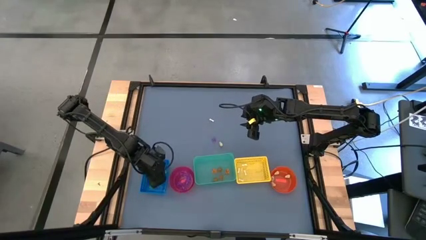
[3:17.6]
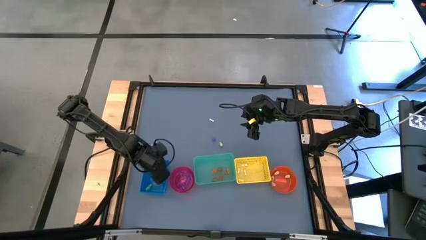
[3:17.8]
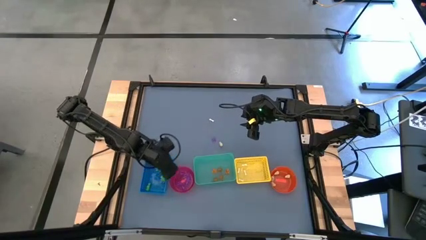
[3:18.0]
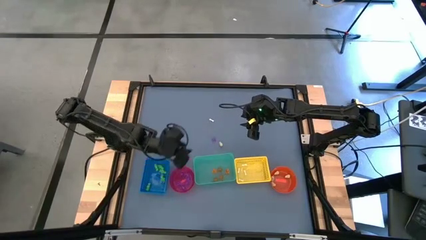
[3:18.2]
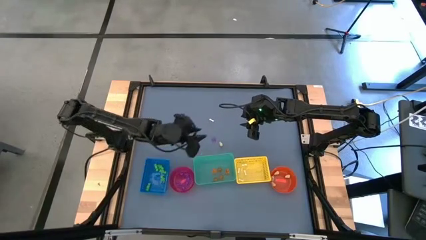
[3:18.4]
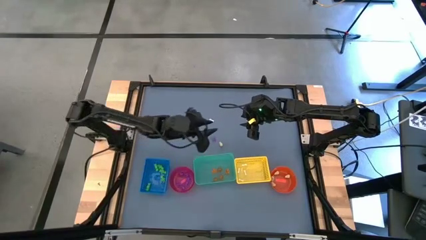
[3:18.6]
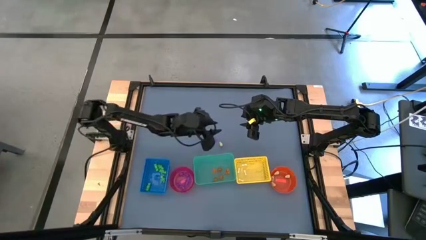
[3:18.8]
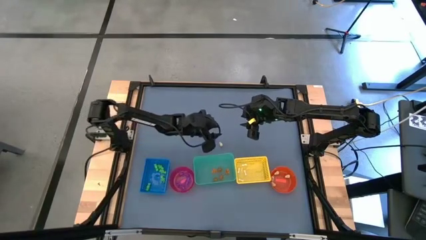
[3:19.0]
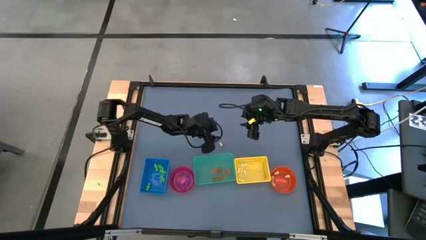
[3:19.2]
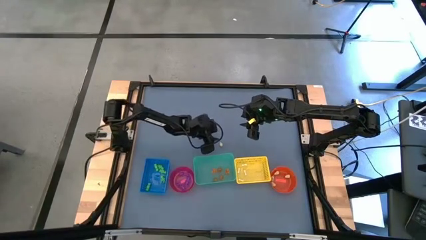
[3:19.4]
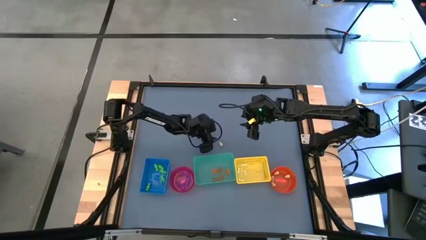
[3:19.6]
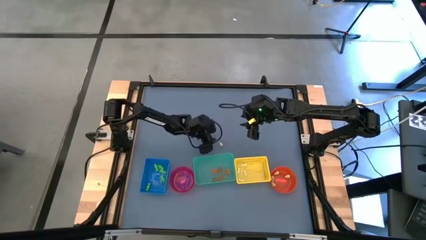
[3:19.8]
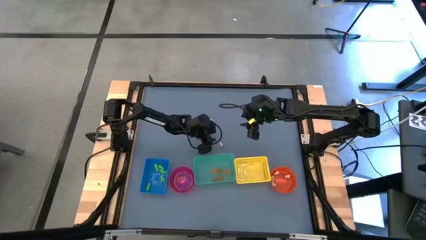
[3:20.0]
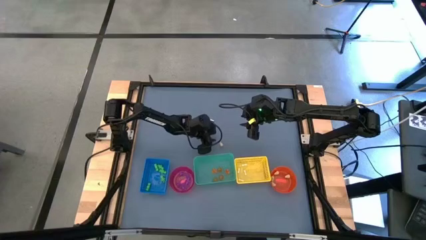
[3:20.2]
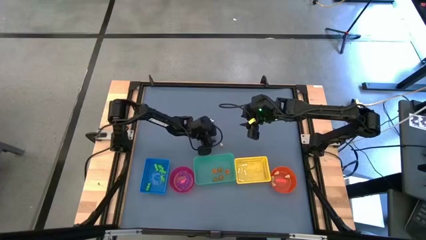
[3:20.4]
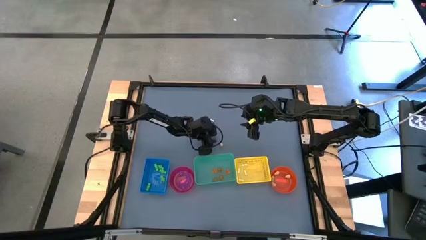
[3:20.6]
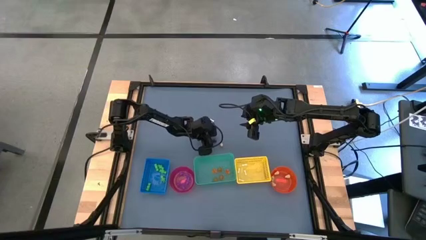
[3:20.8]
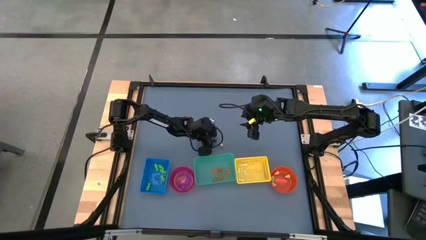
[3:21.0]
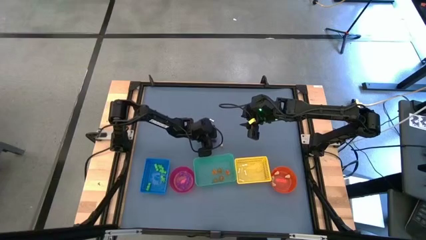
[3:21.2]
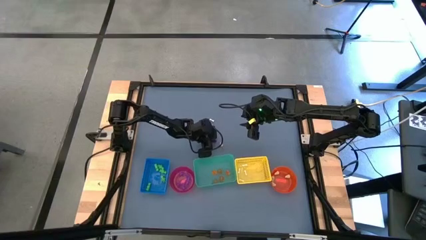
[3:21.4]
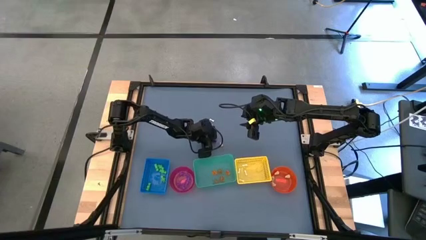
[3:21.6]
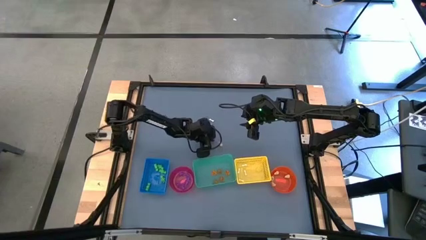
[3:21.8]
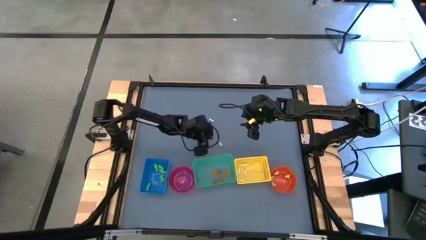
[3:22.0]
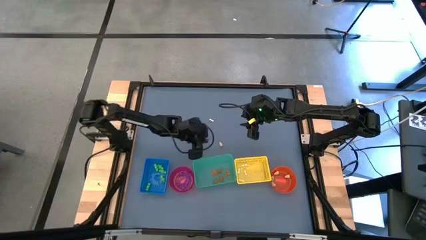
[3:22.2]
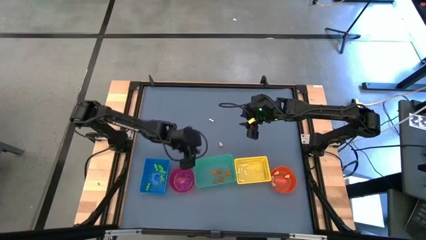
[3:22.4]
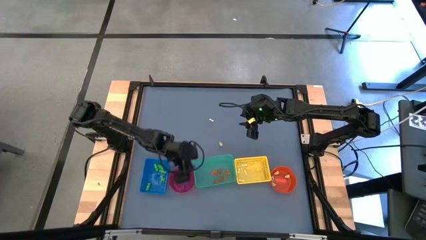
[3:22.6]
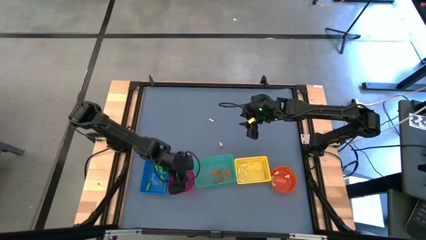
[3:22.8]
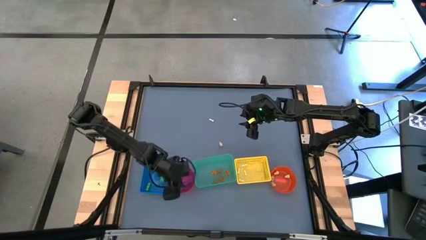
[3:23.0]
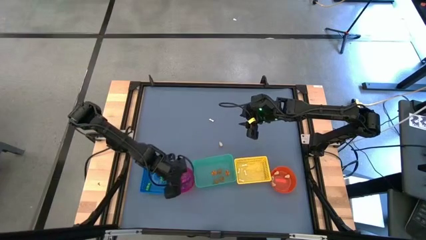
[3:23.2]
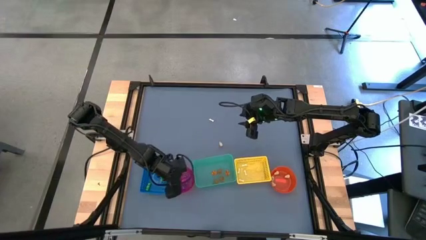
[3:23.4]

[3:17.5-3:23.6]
Task: Sort Halloween decoration
Put the purple spider toy into the pink bin

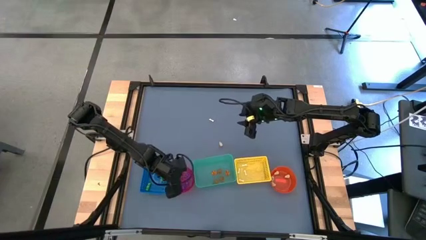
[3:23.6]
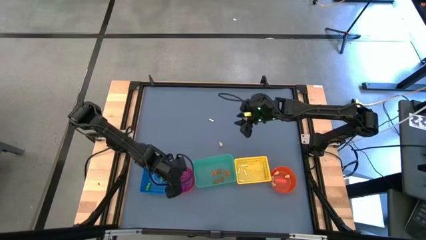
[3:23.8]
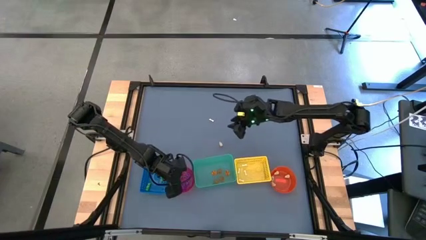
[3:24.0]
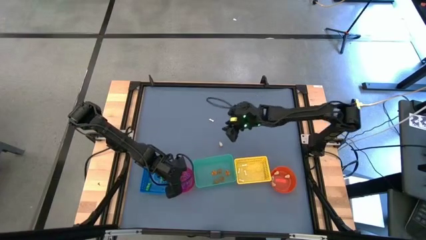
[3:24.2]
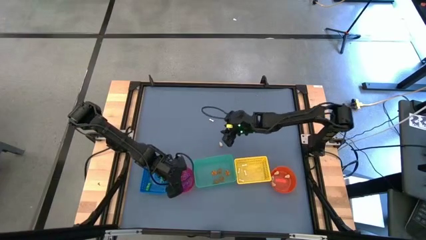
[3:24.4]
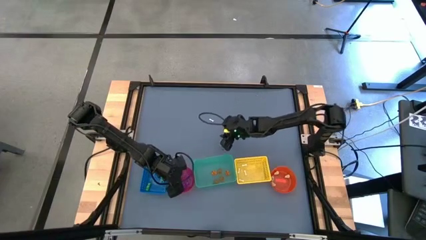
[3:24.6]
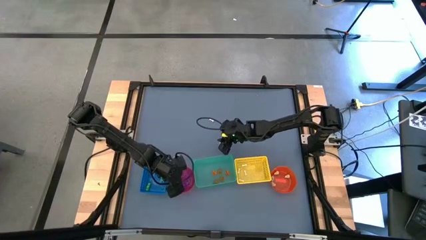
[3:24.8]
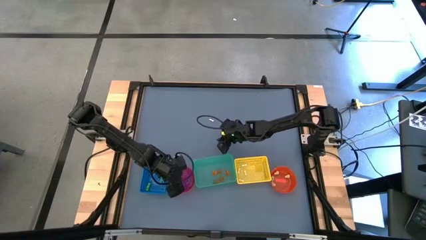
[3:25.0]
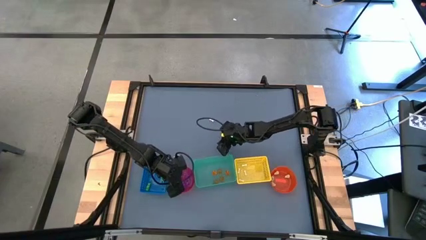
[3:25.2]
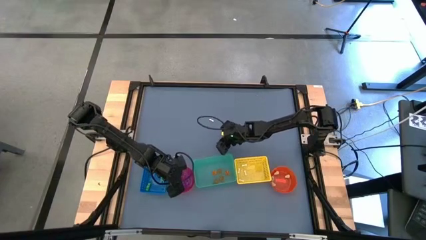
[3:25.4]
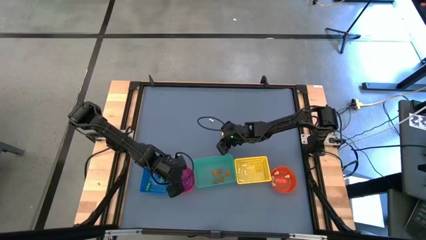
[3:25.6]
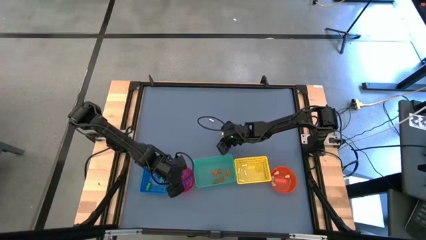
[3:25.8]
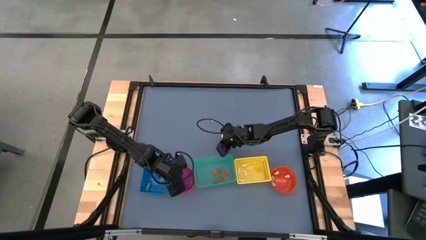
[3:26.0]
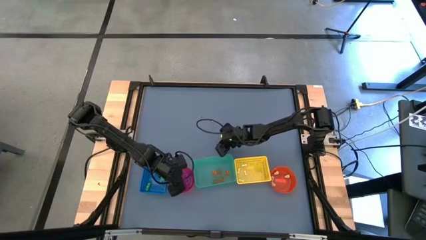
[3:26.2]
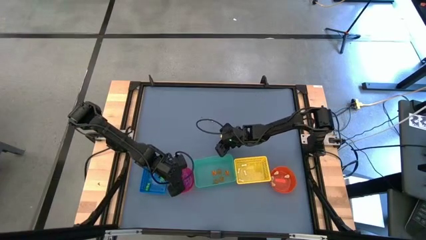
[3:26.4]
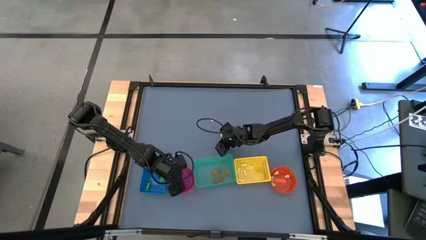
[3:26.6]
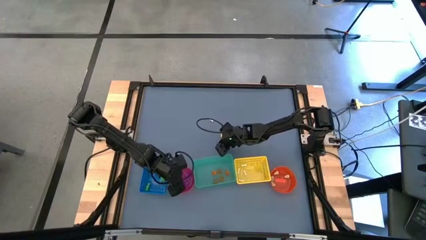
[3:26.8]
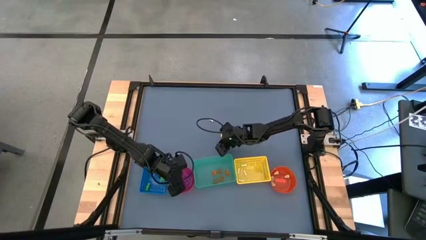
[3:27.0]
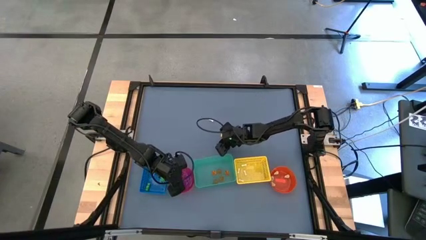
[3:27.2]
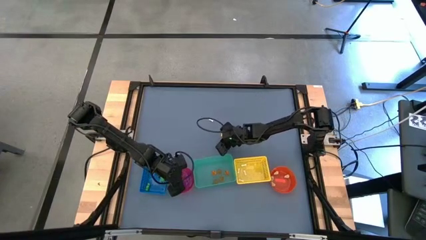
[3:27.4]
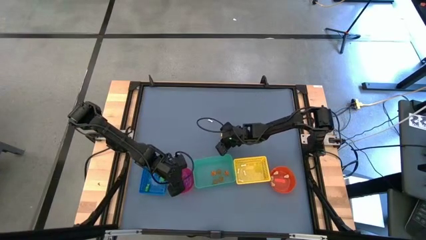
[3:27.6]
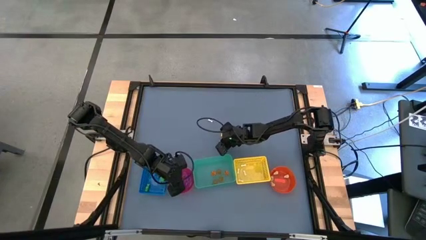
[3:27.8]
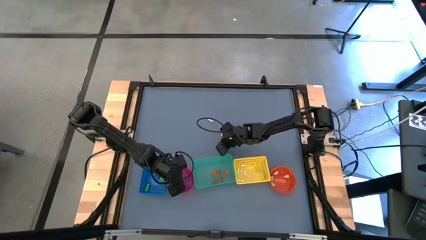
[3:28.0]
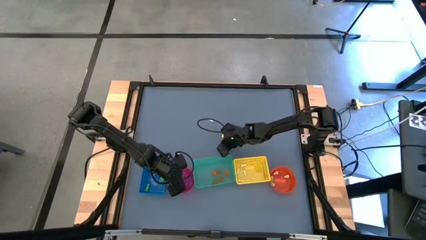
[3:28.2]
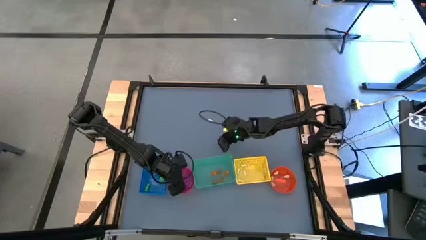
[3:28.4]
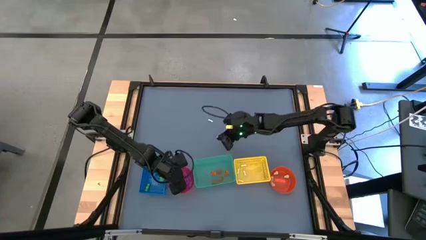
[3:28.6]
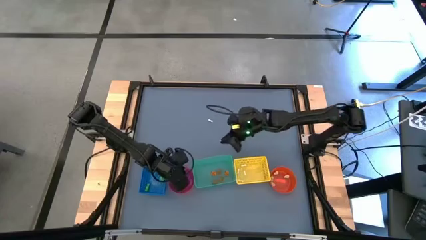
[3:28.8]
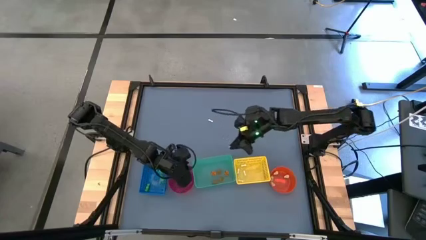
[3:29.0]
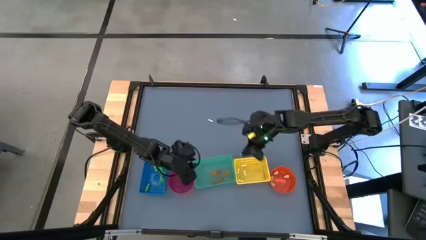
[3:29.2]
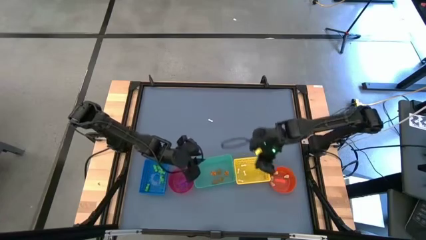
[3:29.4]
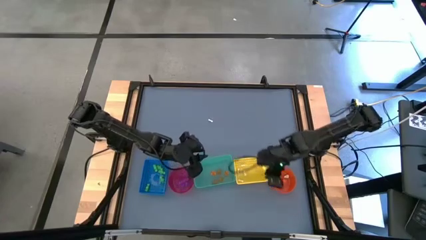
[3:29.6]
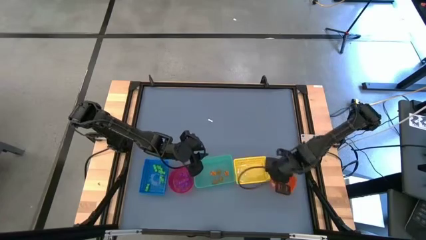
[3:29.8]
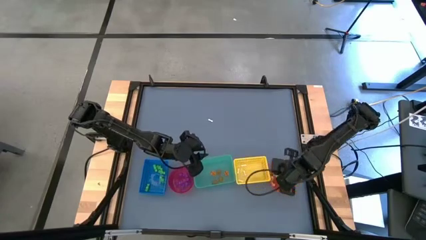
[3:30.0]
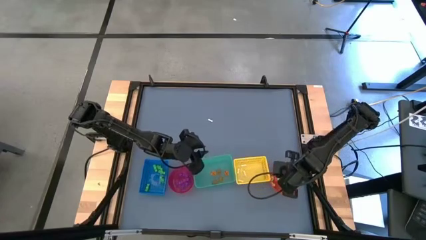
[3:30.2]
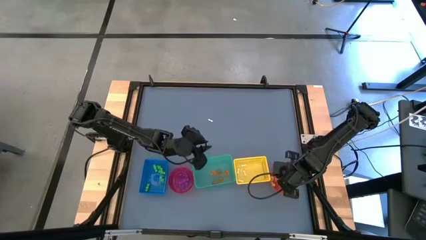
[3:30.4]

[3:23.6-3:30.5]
Put the white skull toy into the orange bin

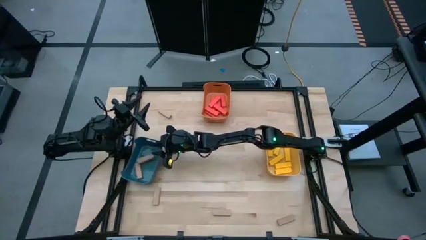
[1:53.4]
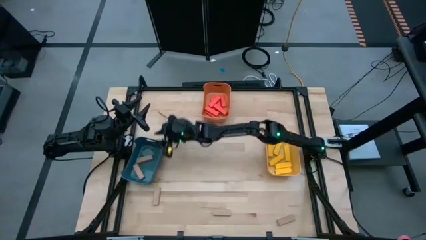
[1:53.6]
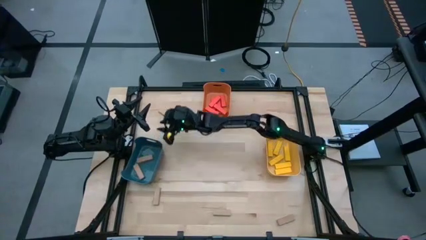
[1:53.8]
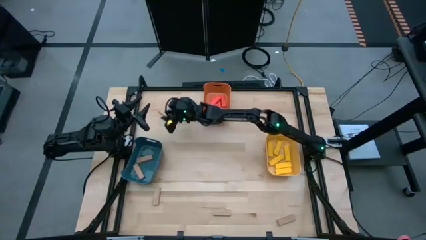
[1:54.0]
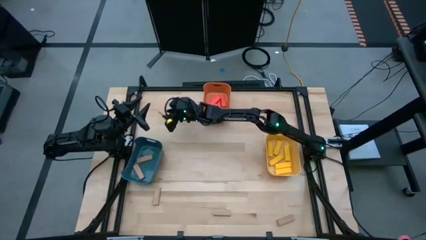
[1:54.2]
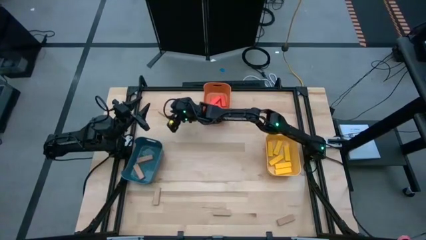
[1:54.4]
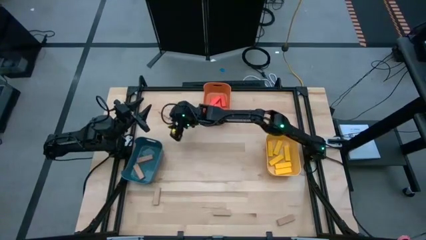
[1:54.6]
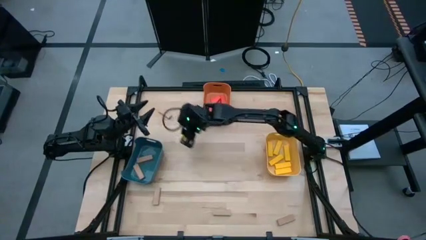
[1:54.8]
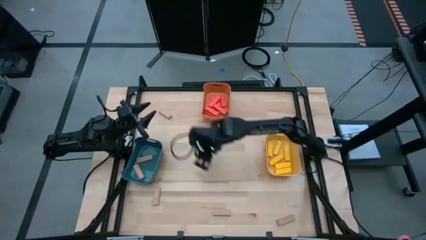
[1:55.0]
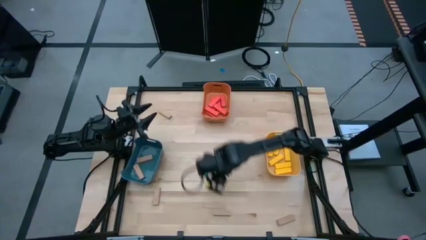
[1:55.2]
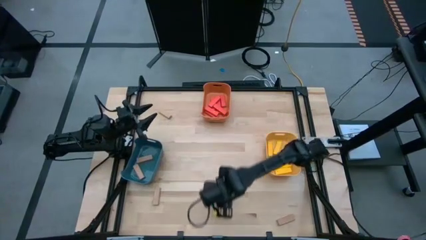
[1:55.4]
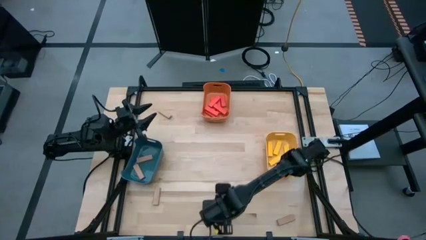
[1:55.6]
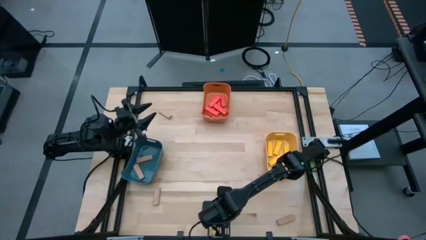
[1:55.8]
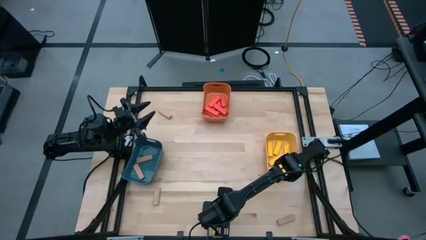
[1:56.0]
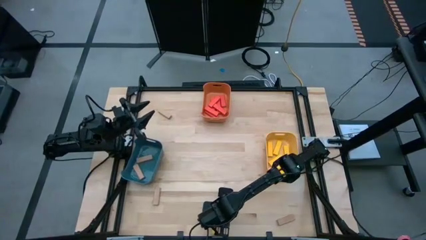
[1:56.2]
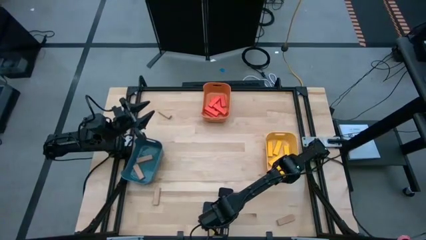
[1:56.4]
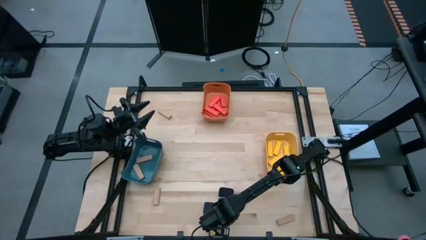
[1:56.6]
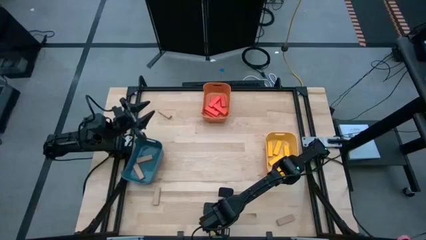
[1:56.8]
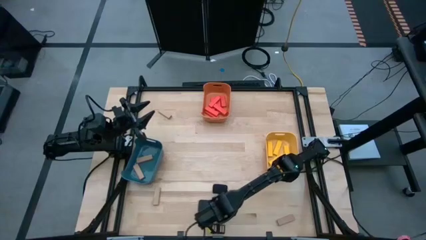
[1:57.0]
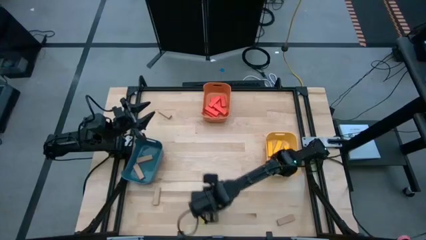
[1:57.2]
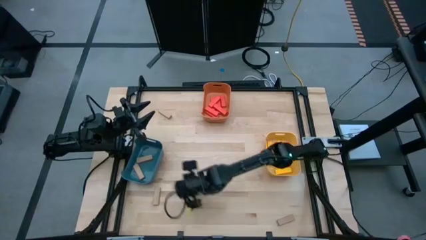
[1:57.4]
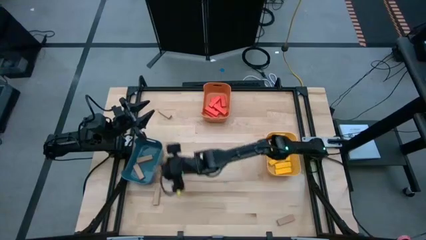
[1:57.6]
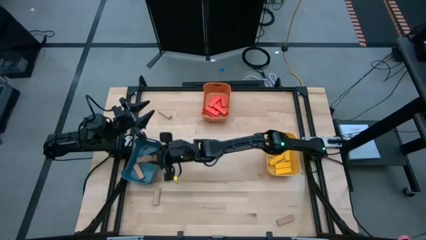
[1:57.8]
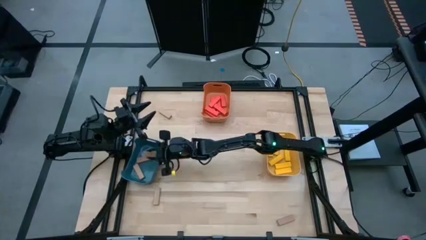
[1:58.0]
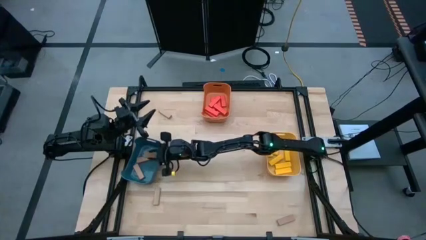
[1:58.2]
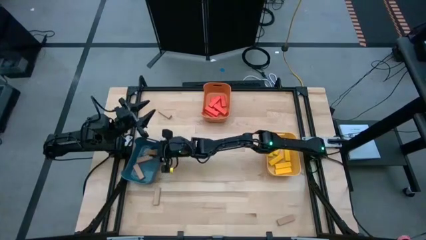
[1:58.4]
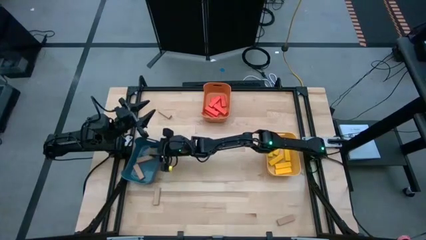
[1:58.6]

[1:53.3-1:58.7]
Task: Sort blocks
Put the bottom center brown block into the blue bin
